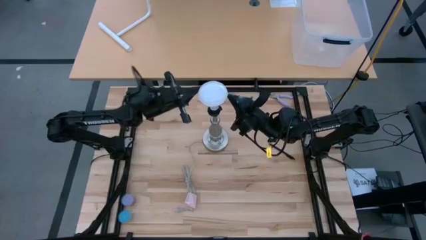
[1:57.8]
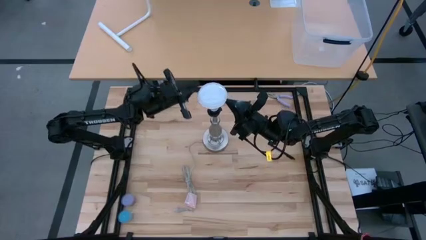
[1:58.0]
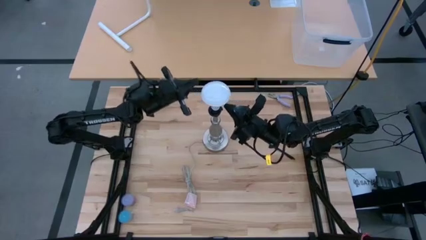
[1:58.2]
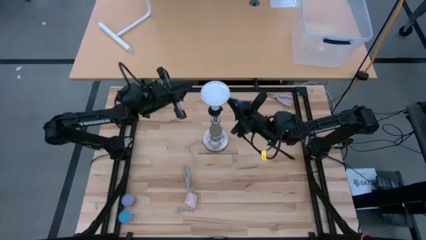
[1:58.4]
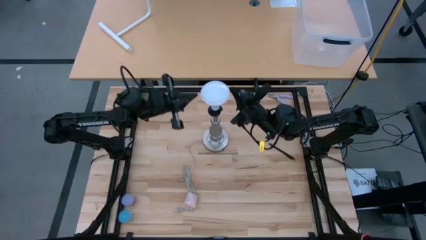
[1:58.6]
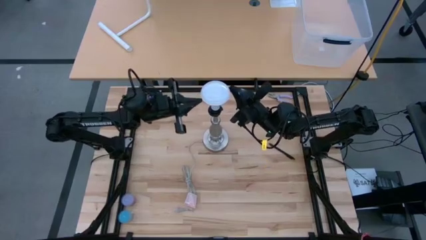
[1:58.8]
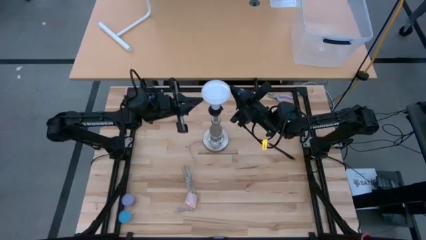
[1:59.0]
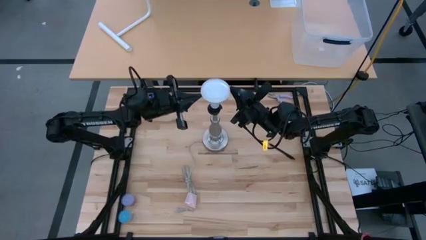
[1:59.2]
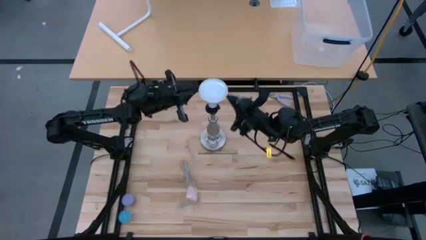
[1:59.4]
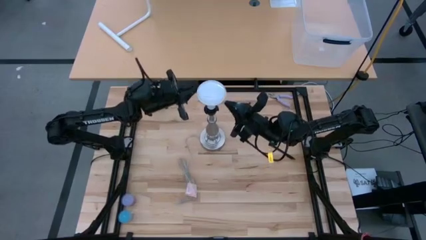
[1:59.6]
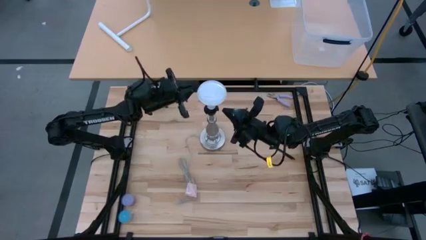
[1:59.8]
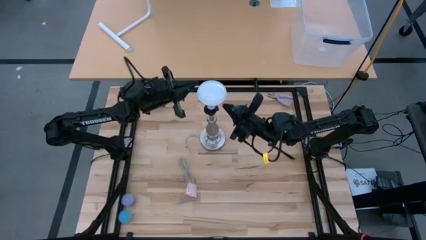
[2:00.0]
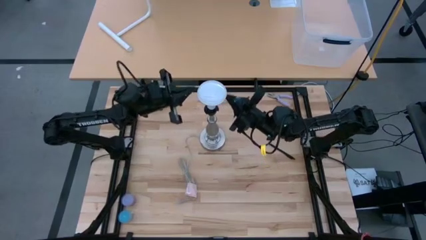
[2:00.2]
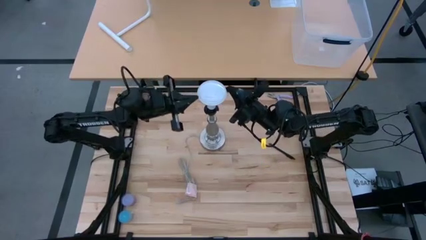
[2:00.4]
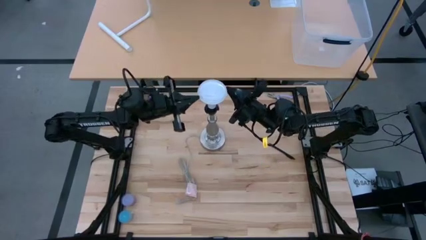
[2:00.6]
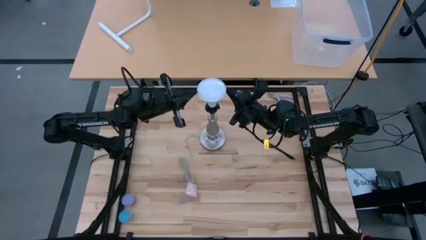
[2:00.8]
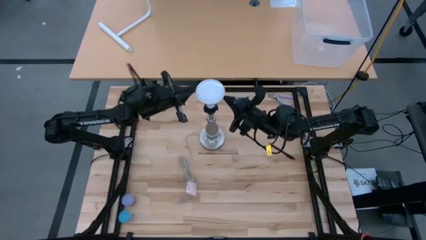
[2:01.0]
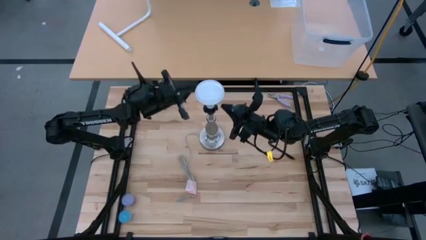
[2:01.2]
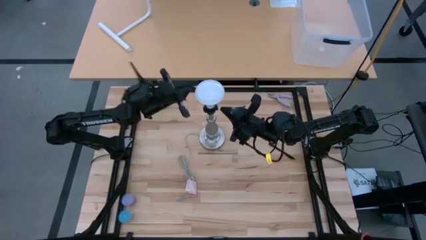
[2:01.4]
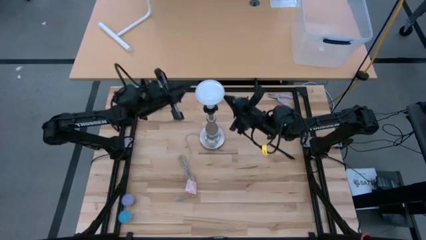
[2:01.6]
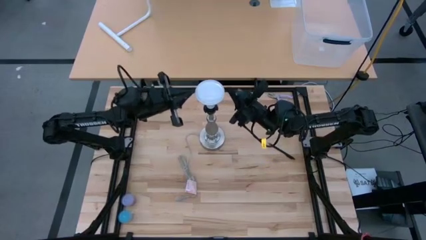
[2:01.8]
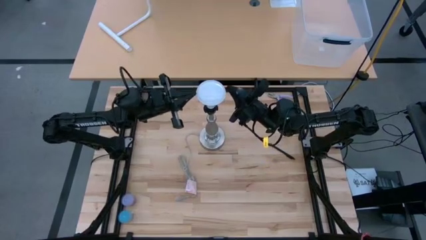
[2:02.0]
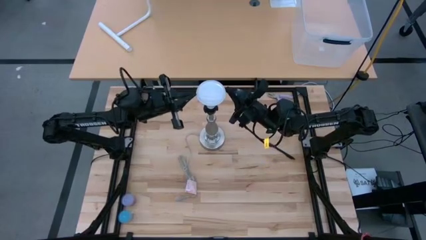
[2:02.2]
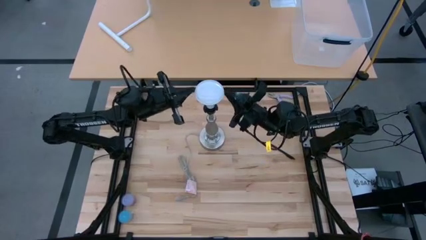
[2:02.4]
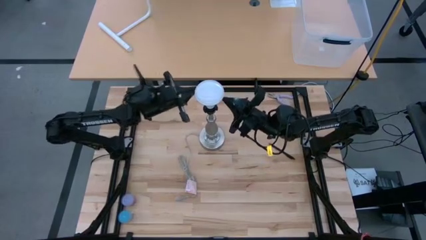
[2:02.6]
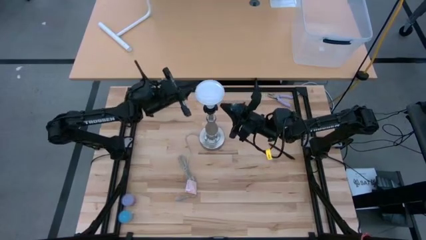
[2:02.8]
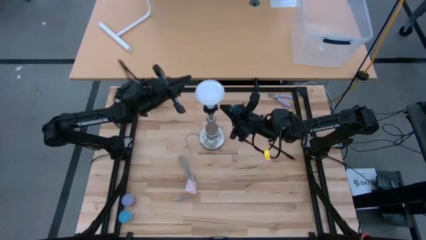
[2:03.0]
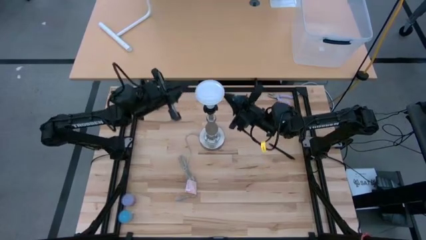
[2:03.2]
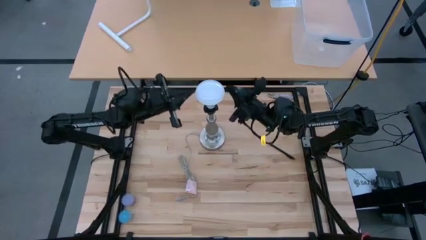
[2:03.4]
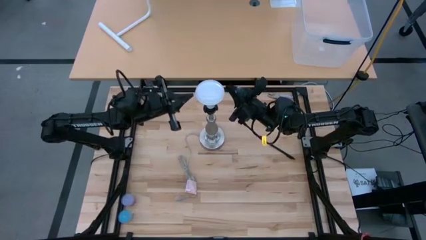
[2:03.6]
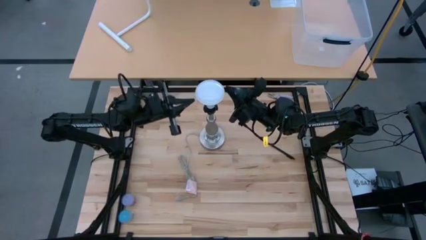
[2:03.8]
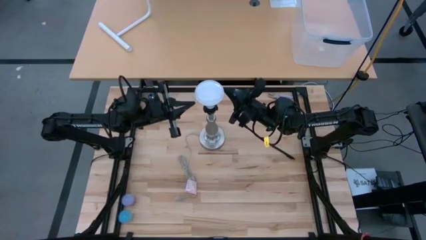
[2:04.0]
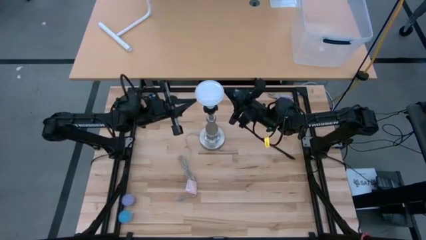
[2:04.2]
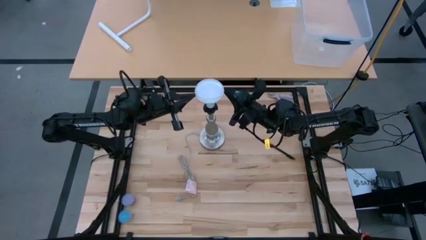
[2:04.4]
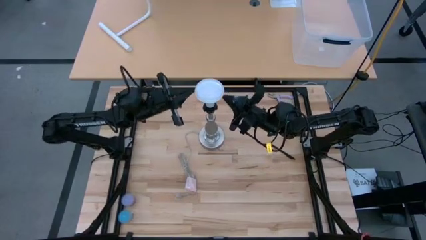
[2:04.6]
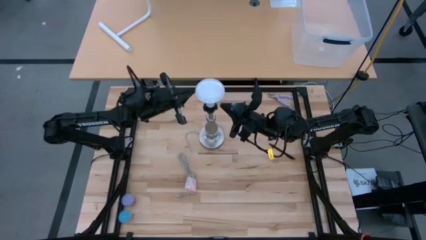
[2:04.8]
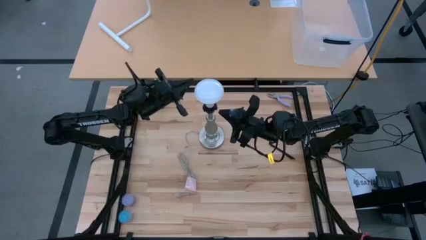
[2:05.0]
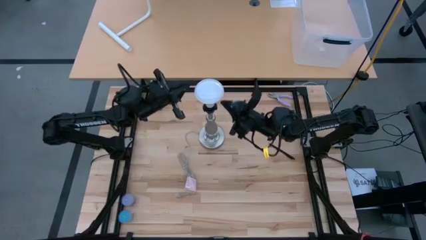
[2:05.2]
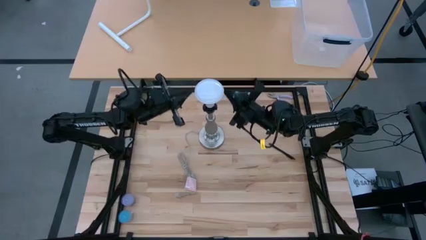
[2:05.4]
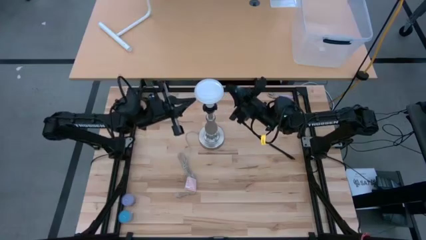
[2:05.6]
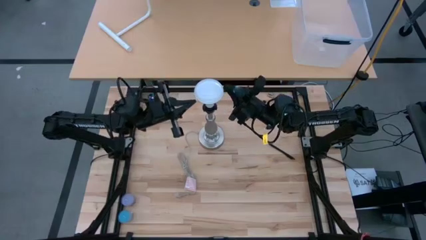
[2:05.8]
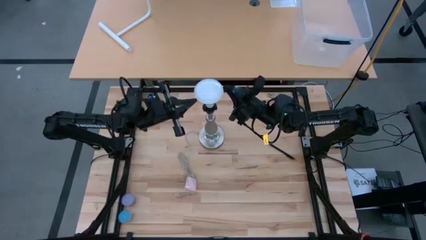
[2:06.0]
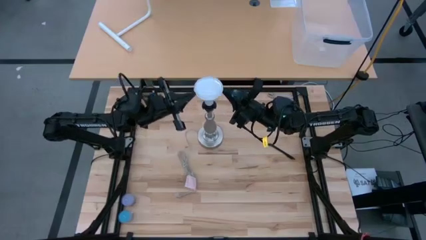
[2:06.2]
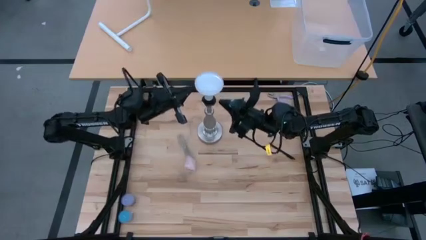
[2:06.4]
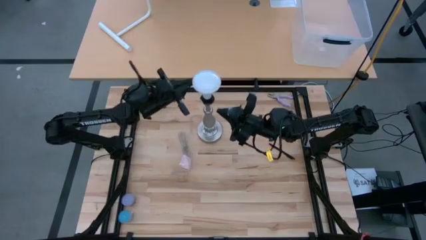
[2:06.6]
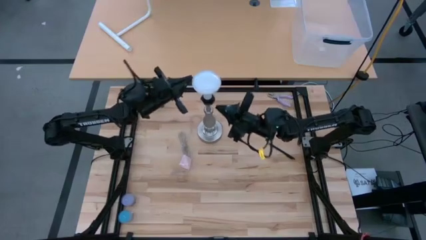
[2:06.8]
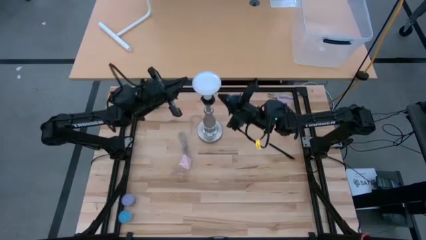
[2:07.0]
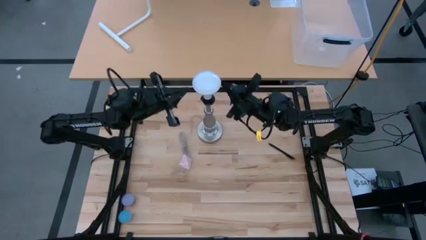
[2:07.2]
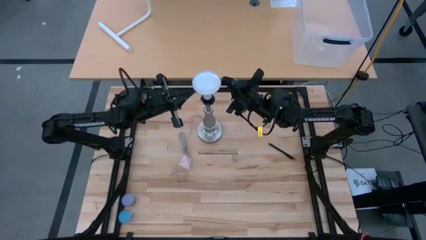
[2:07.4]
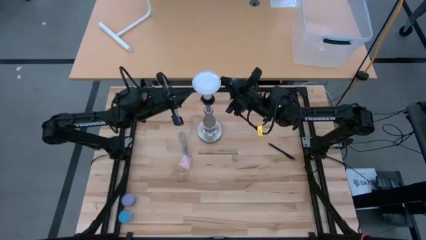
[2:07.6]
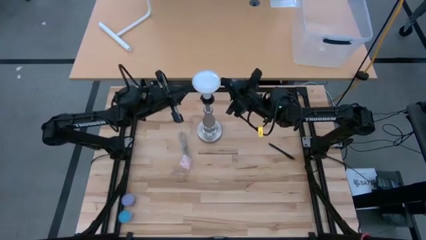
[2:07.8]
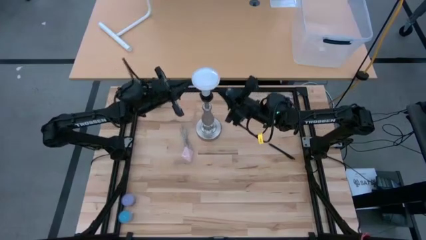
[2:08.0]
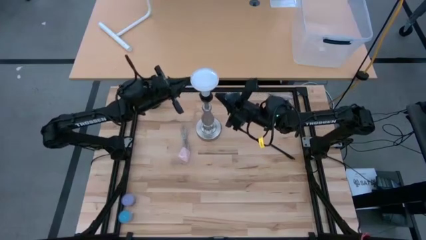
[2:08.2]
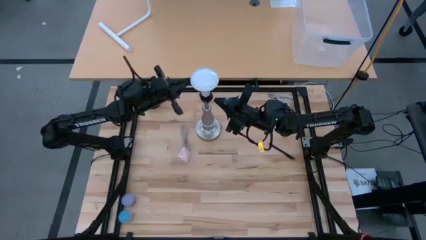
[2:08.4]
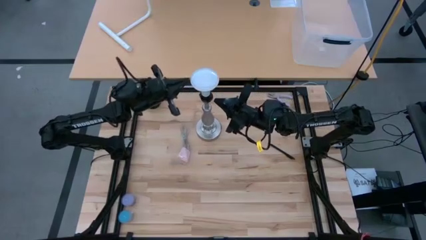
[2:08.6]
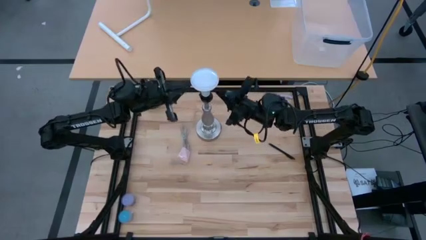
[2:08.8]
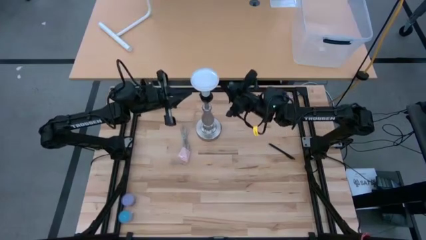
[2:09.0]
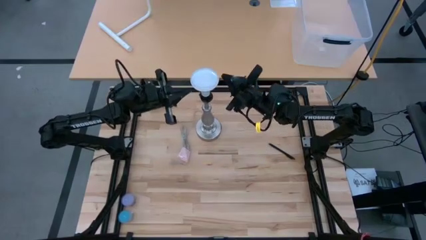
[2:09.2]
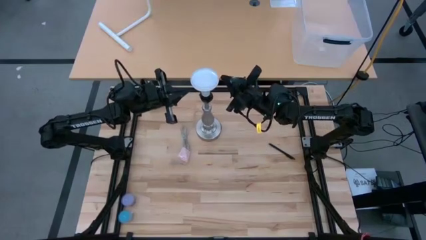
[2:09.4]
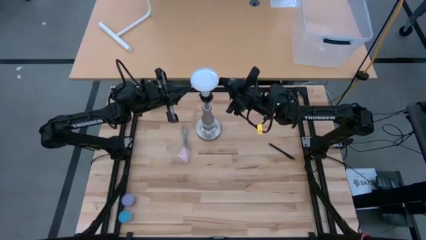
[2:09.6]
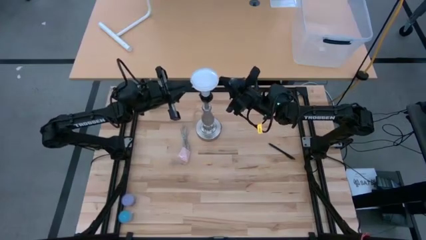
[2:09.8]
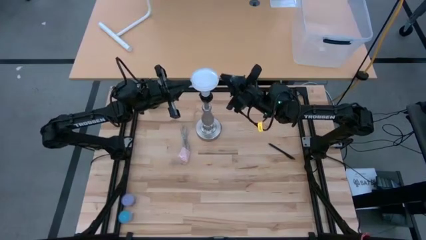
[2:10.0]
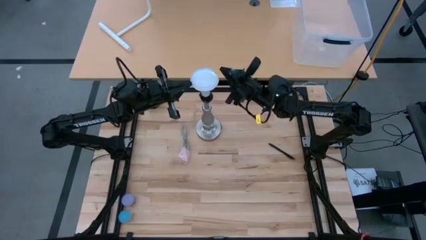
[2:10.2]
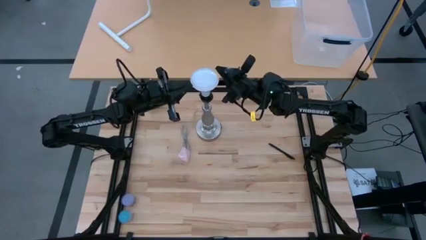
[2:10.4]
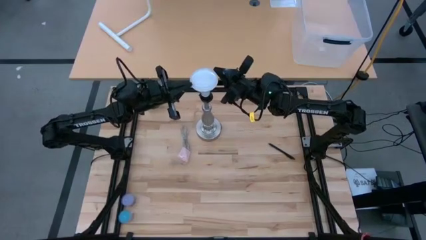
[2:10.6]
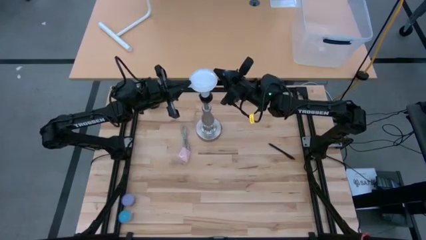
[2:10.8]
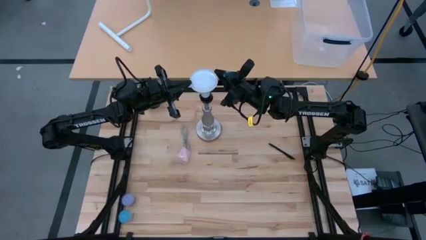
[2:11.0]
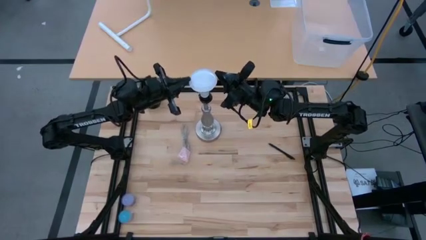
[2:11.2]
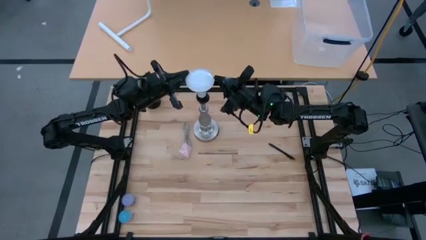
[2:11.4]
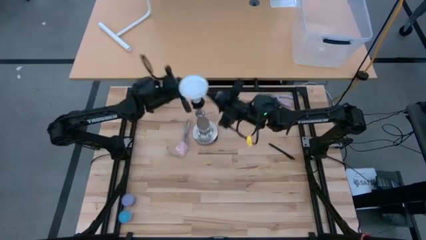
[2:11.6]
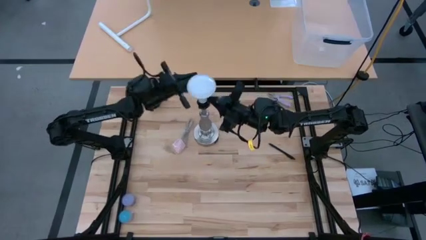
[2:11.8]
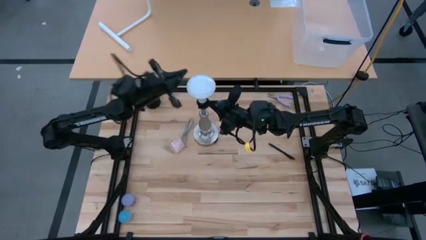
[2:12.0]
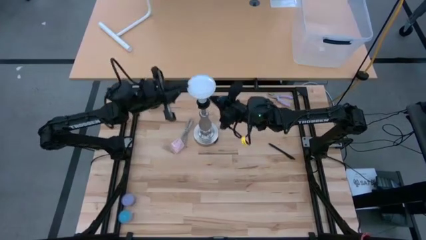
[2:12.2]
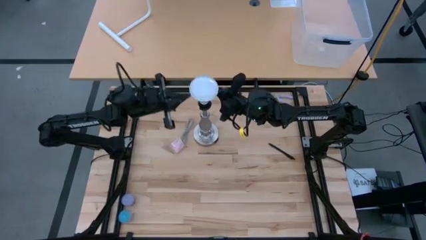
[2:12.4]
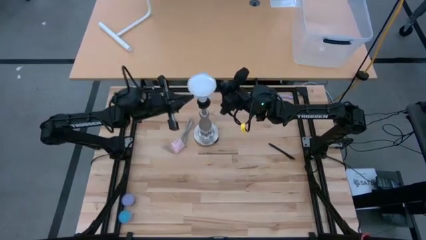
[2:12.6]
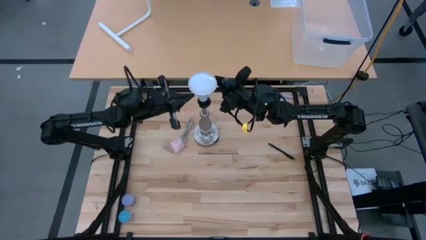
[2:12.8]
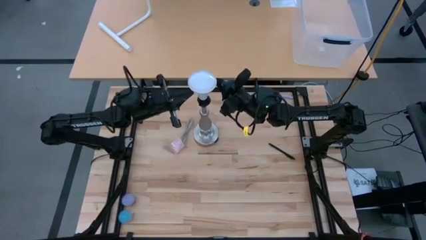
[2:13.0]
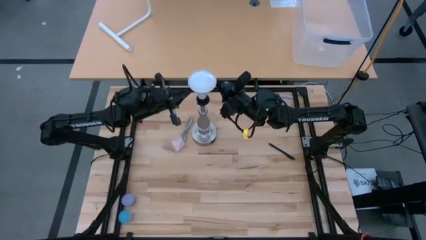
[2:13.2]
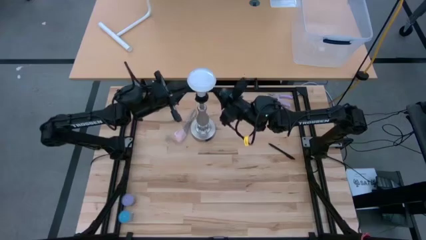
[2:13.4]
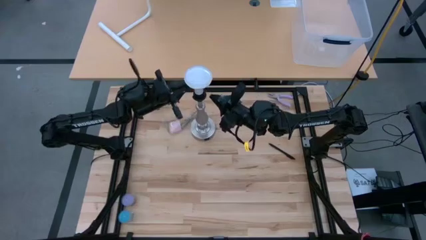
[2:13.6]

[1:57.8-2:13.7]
Task: Screw lightbulb
Insert the lightbulb into the lamp
